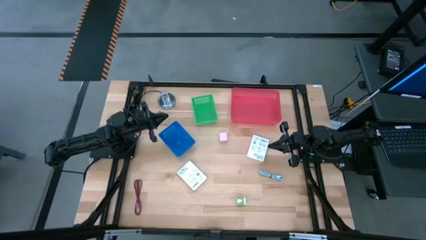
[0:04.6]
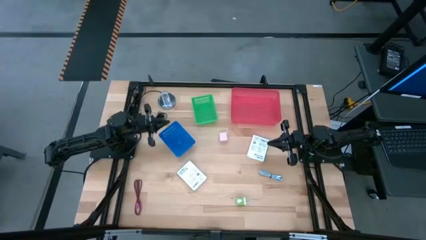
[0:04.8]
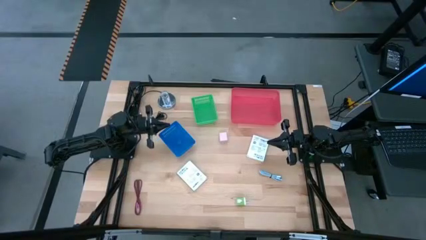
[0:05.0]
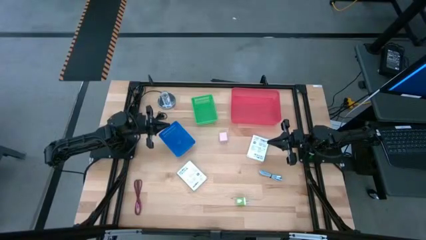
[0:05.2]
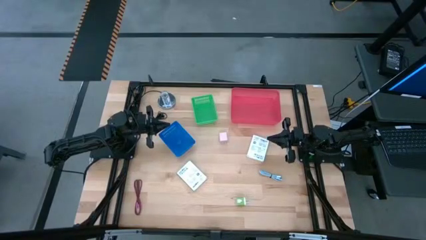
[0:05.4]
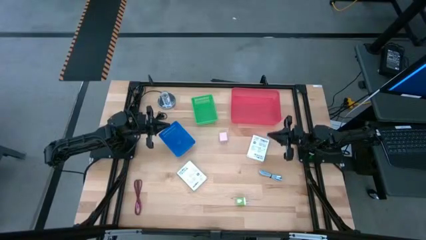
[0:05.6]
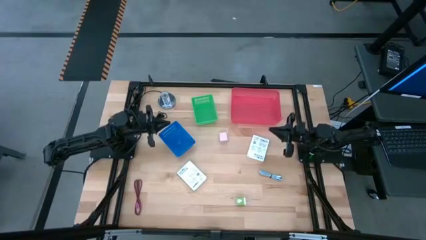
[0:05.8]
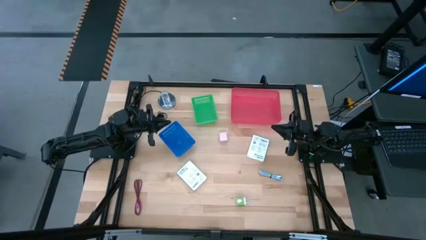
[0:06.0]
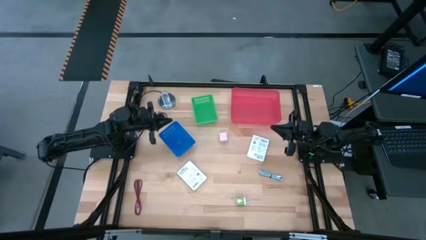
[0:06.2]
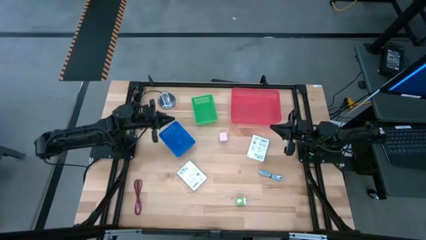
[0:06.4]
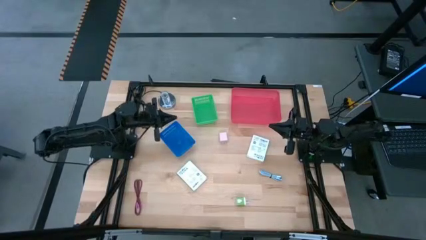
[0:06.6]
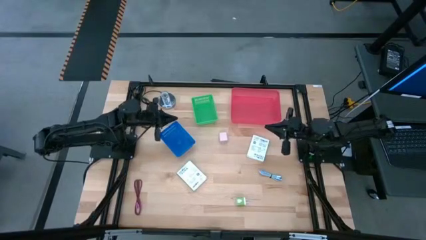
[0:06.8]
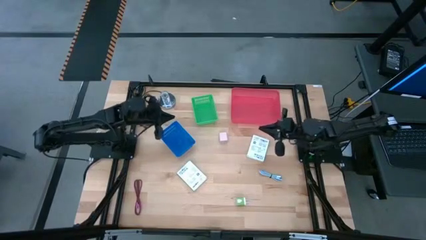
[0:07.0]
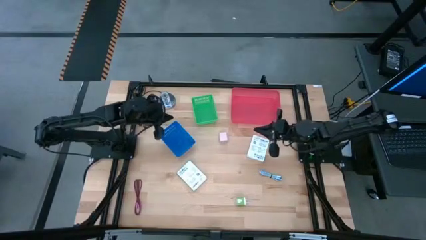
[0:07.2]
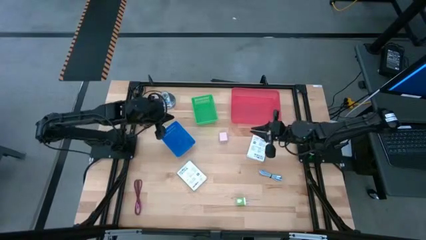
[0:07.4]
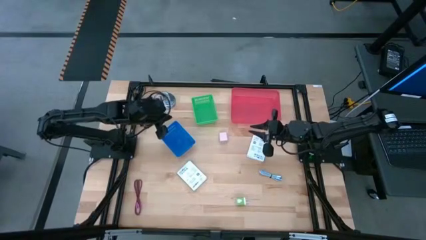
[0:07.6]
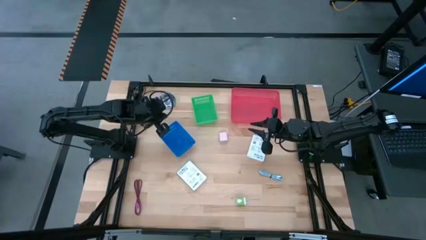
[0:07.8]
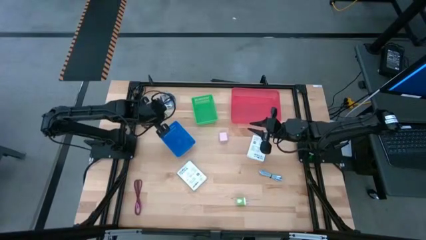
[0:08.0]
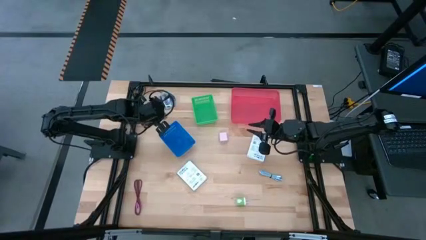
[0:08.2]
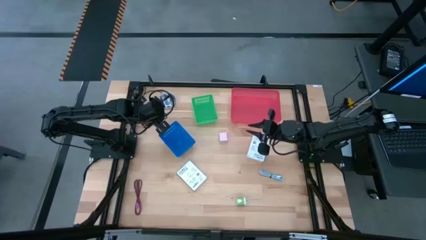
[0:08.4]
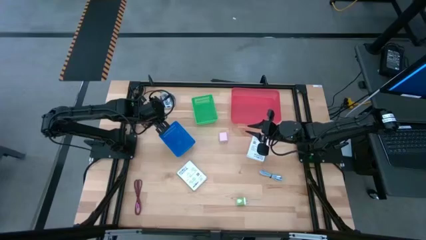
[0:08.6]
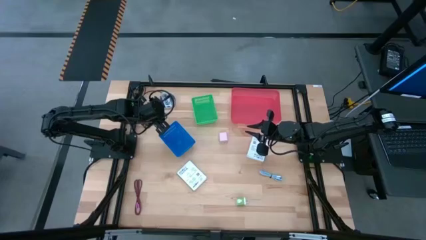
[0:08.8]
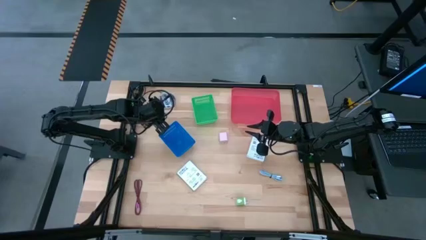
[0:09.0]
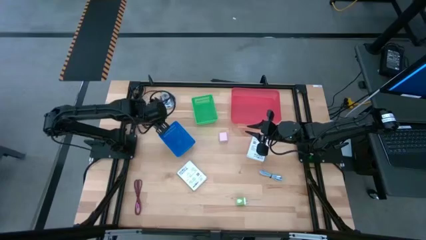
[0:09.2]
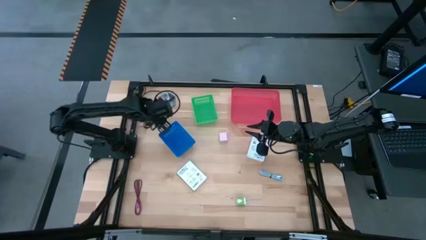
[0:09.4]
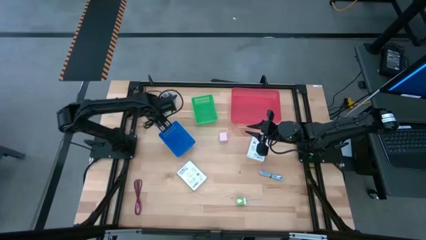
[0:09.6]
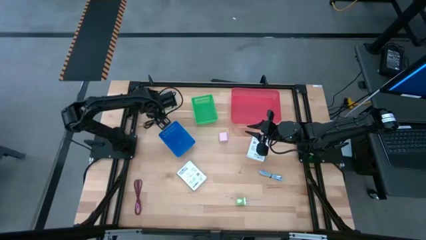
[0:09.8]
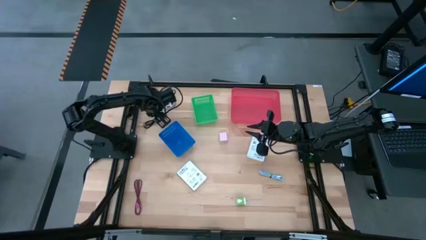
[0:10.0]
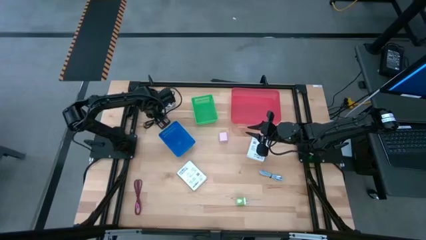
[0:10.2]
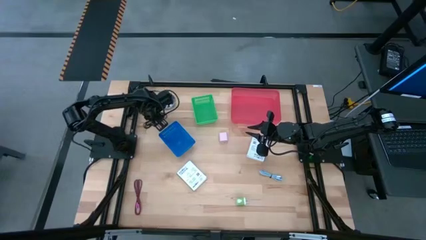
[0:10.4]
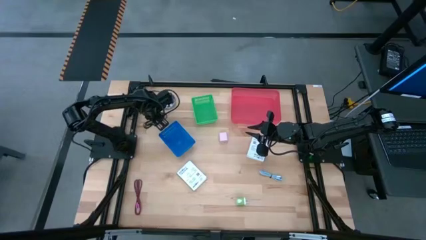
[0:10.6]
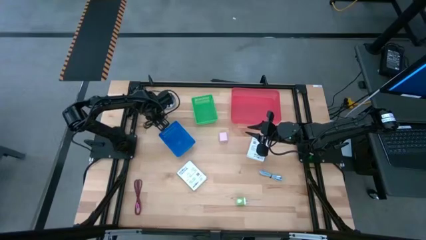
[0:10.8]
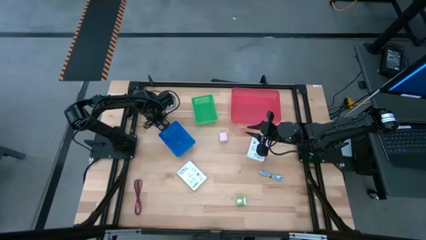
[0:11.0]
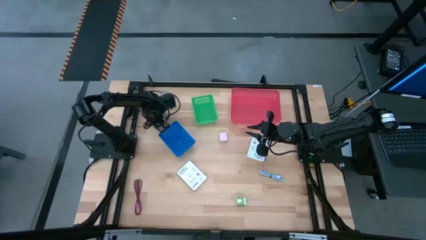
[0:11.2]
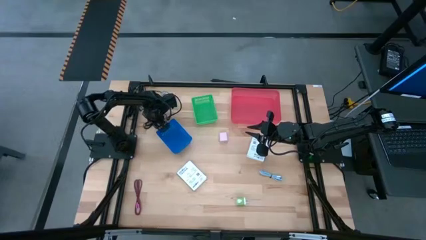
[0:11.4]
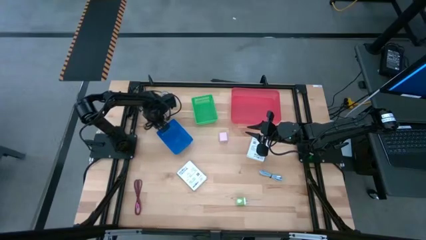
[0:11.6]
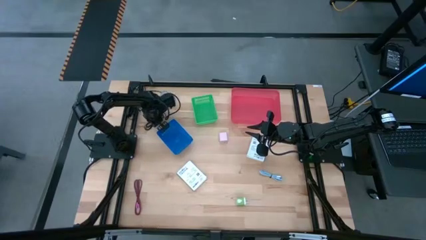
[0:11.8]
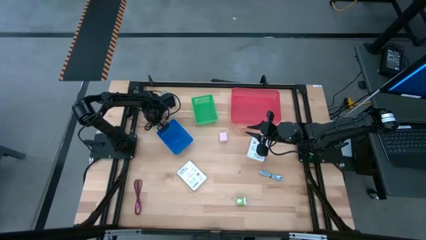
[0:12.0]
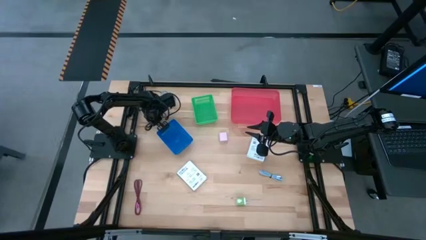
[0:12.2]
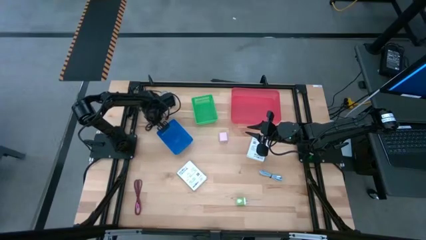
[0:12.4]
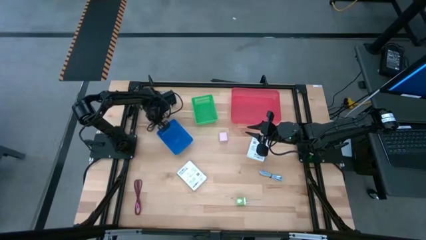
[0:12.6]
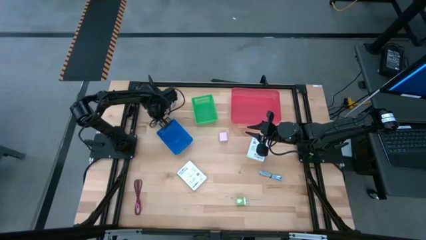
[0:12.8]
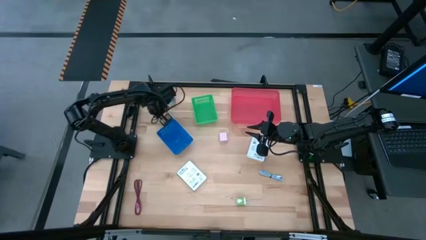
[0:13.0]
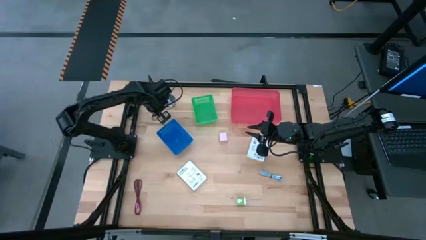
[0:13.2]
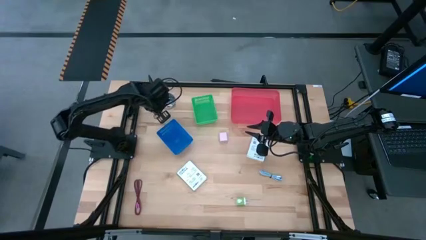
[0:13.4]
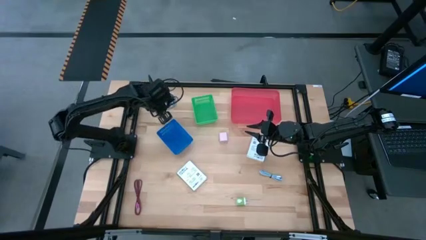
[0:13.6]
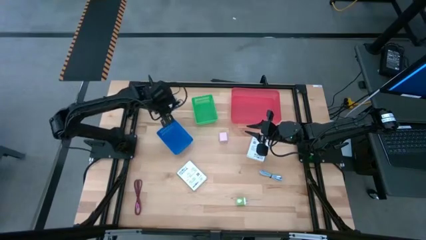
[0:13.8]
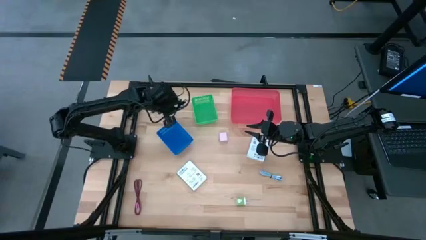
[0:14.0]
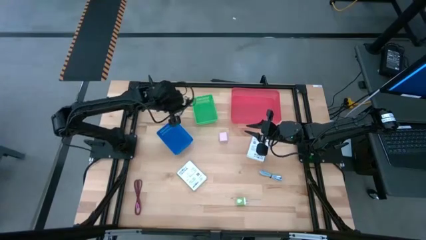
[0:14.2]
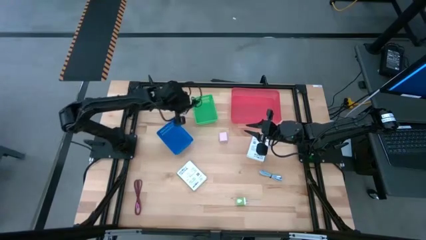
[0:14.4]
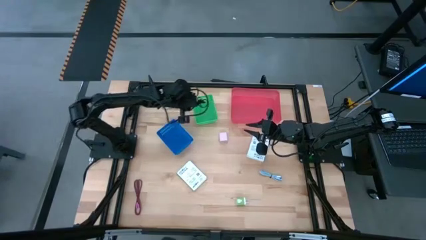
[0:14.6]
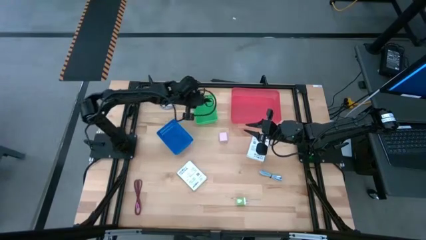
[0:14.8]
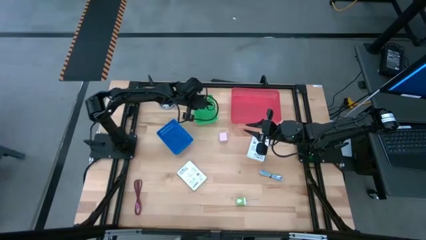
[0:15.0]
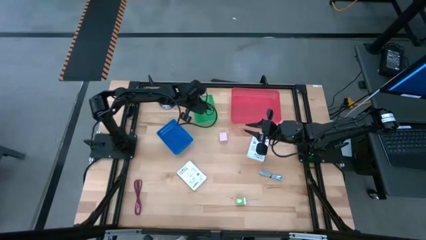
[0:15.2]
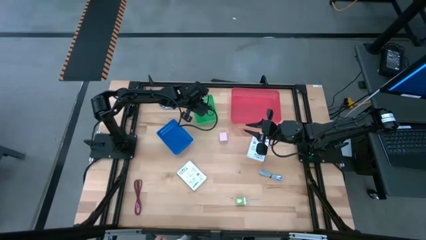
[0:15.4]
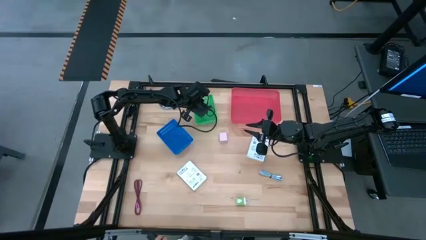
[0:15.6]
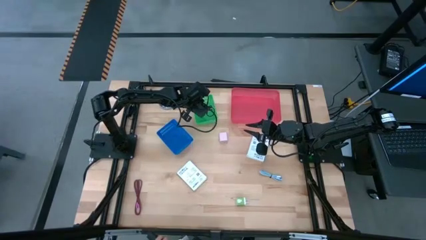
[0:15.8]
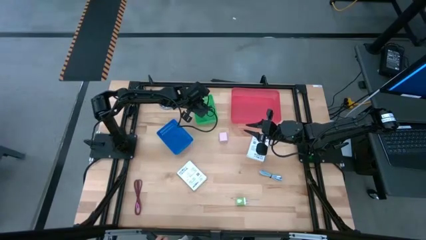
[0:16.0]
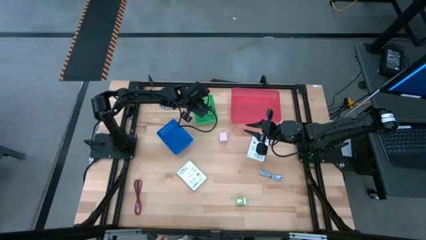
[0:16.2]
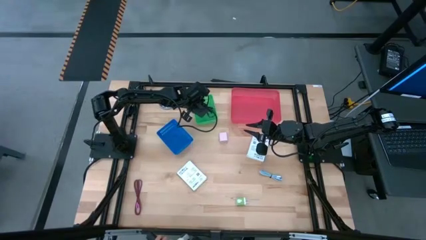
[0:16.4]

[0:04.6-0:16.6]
Task: Pick and place items into bin
Put the black charger cable into the green bin

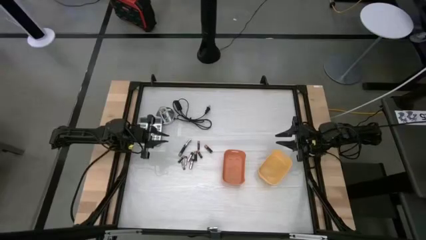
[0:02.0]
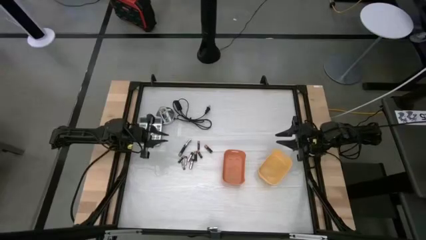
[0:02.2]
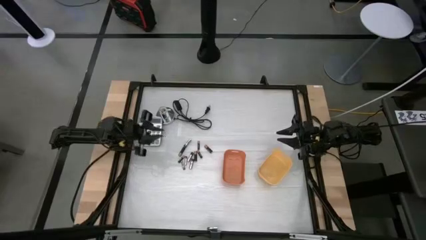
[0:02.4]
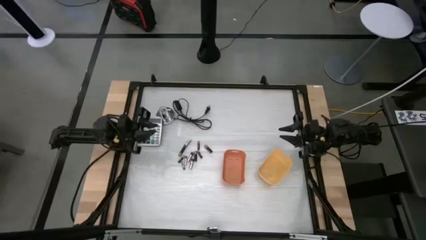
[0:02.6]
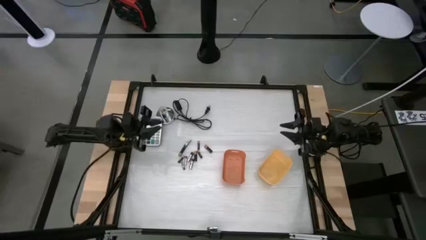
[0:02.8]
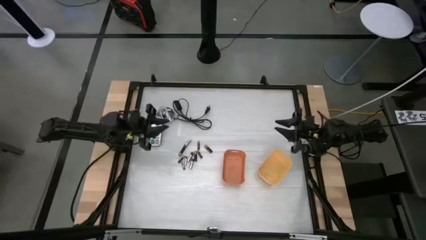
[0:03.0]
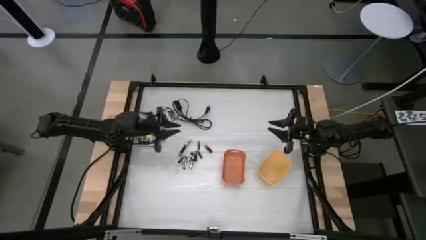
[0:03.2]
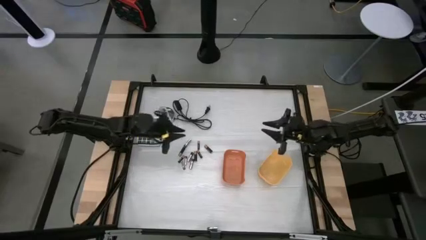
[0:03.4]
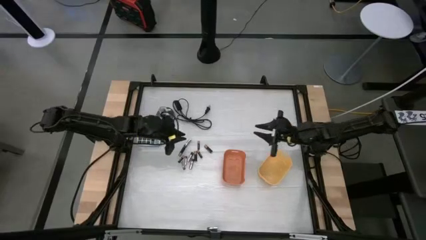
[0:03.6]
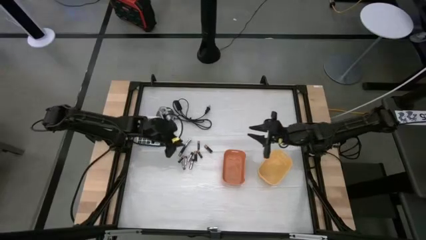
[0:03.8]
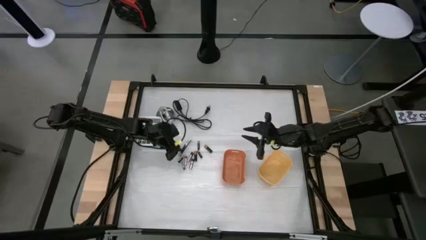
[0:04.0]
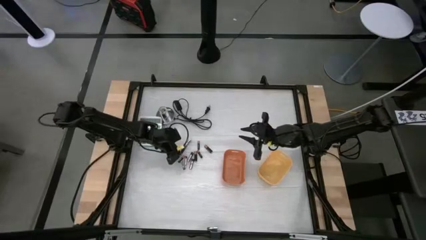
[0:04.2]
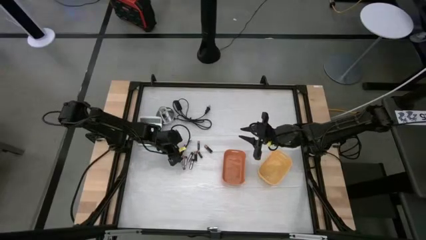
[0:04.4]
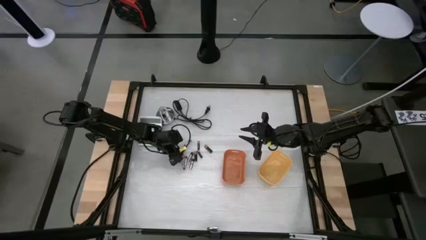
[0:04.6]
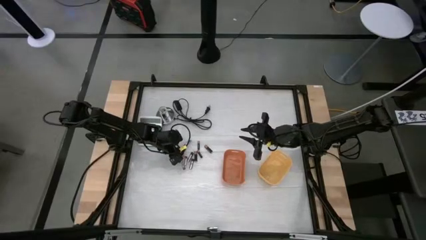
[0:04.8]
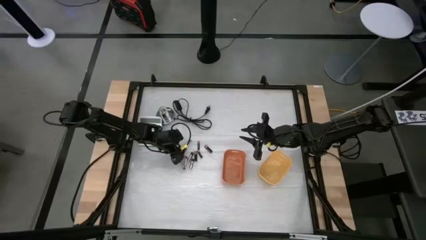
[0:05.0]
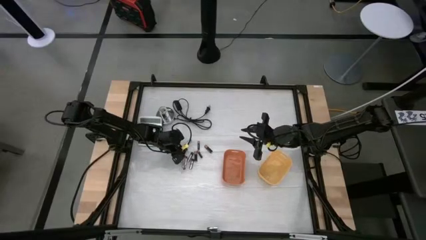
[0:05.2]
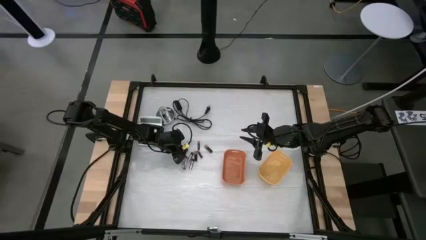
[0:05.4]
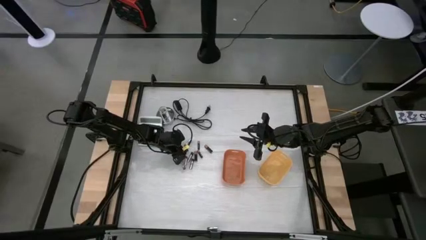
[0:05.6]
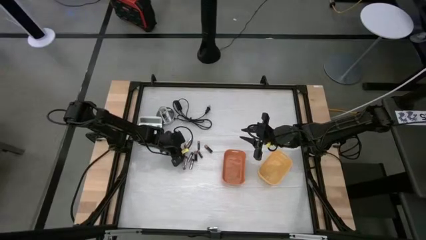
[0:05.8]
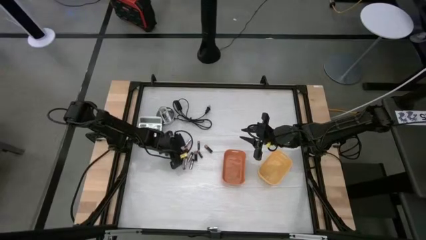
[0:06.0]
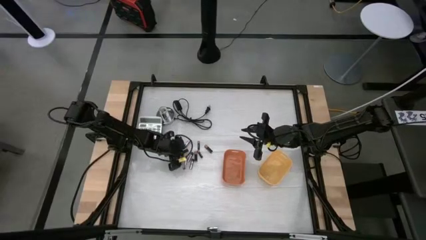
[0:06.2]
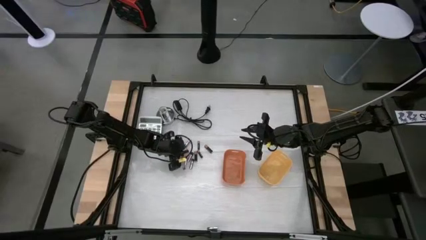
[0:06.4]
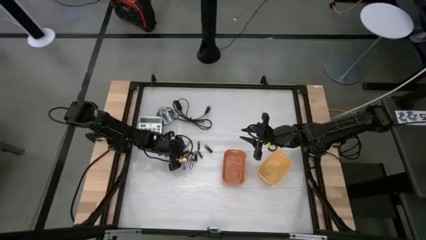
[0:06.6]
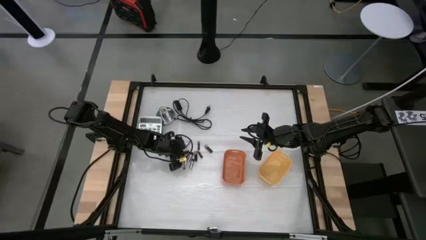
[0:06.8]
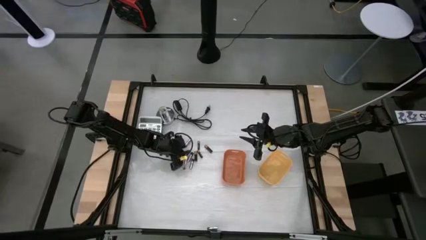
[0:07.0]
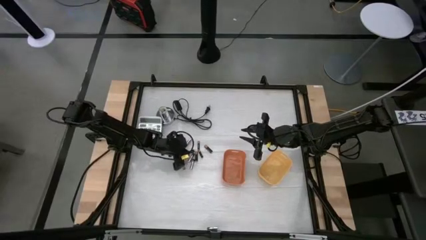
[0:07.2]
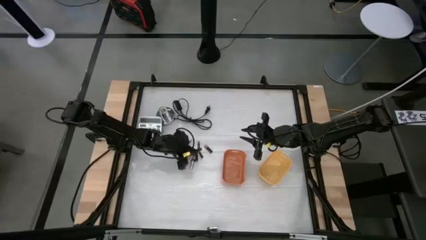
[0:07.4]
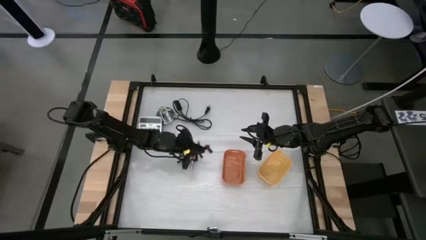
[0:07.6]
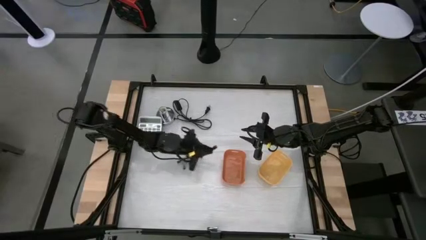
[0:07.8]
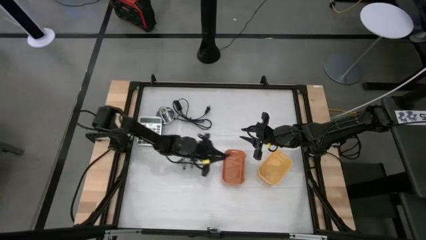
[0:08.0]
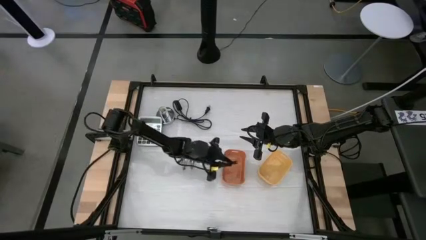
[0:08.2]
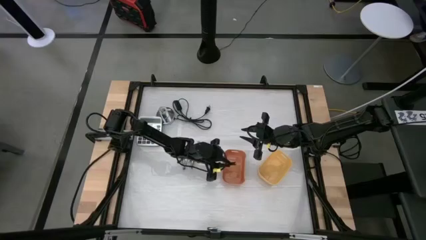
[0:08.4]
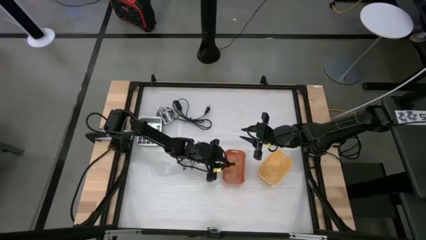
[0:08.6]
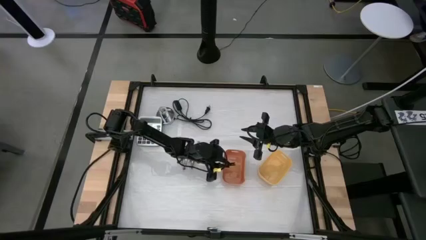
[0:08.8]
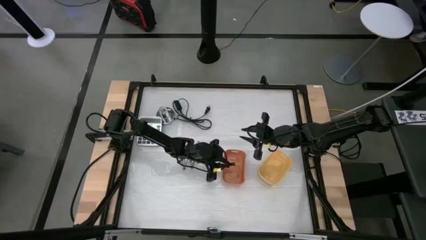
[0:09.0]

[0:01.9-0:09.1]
Task: Sort batteries
Put the black battery into the orange bin
